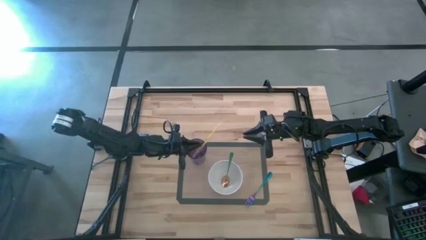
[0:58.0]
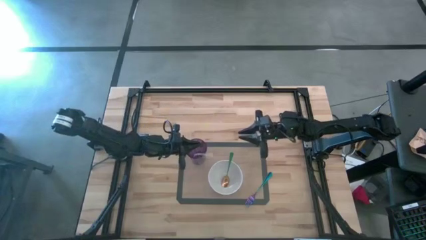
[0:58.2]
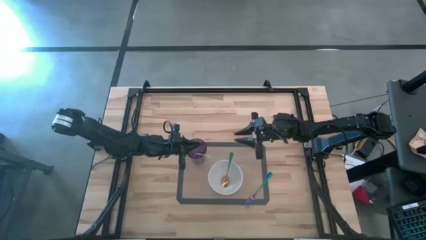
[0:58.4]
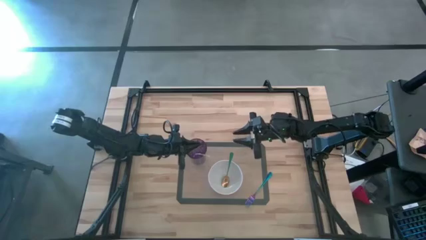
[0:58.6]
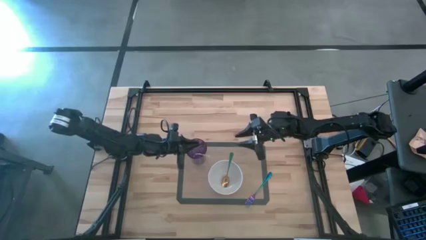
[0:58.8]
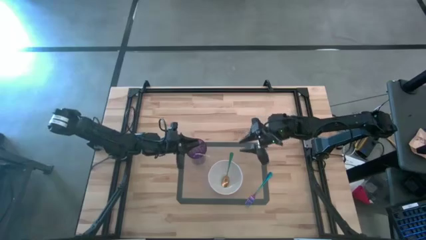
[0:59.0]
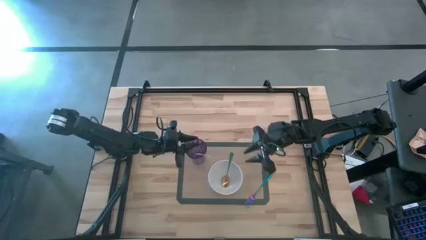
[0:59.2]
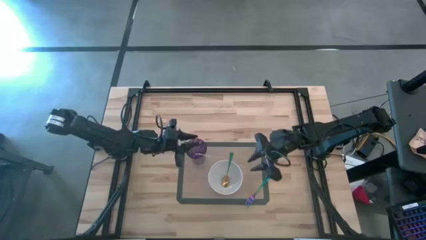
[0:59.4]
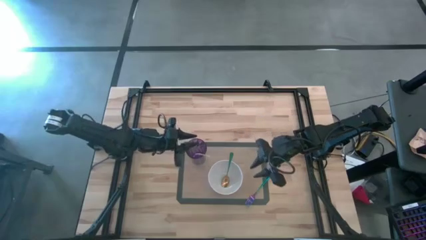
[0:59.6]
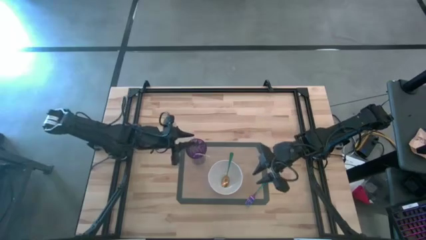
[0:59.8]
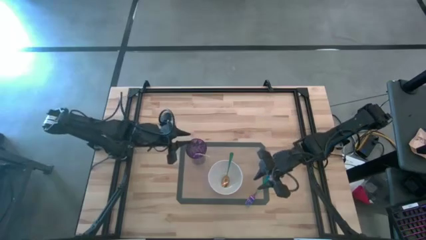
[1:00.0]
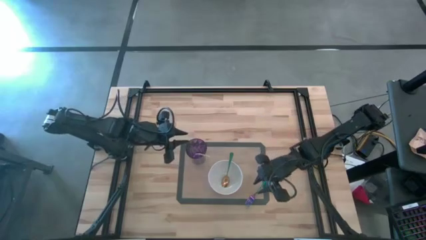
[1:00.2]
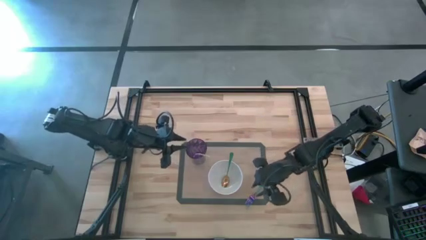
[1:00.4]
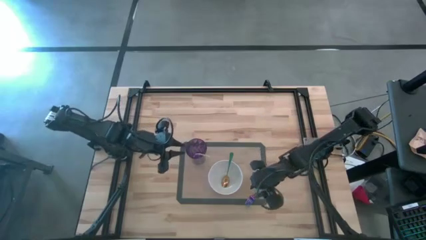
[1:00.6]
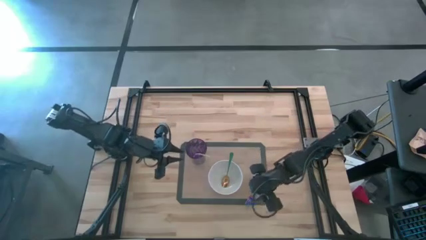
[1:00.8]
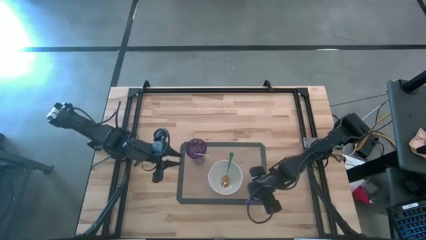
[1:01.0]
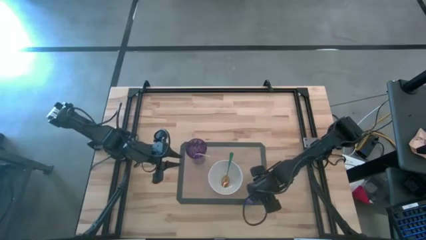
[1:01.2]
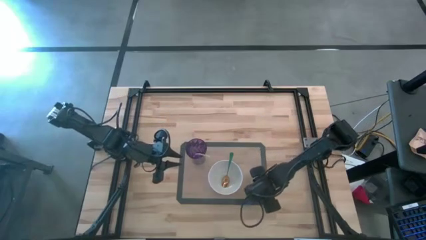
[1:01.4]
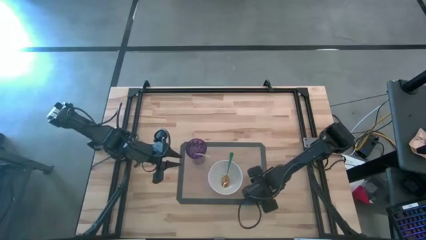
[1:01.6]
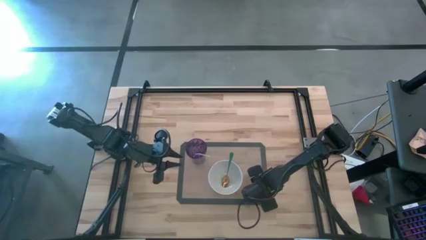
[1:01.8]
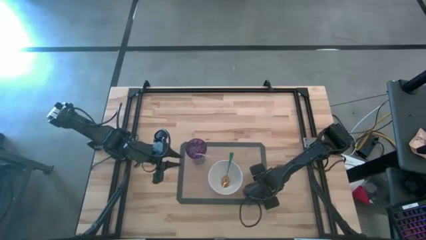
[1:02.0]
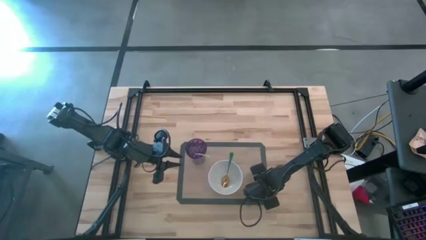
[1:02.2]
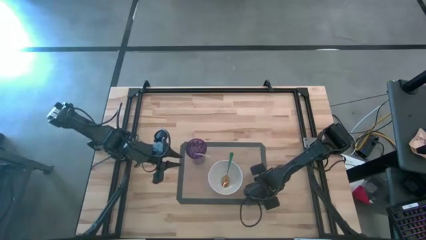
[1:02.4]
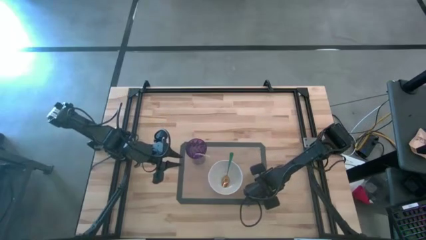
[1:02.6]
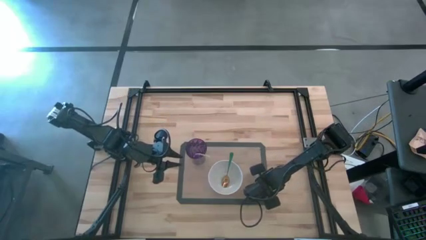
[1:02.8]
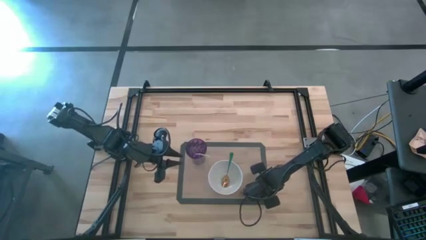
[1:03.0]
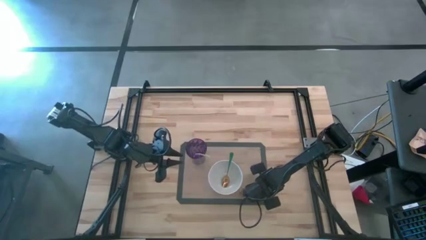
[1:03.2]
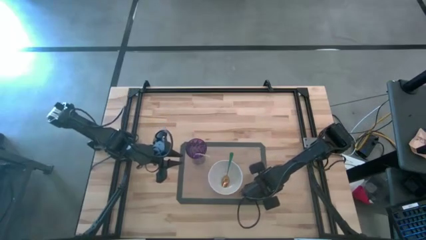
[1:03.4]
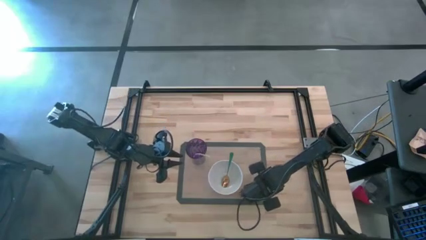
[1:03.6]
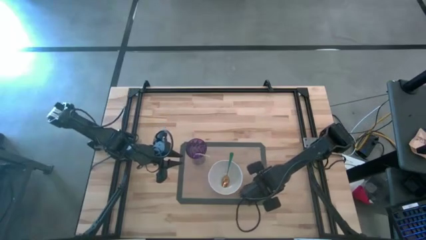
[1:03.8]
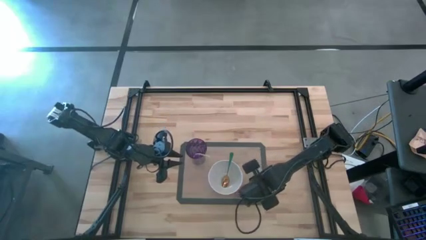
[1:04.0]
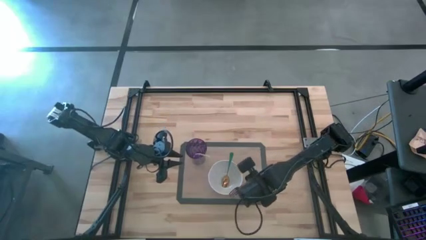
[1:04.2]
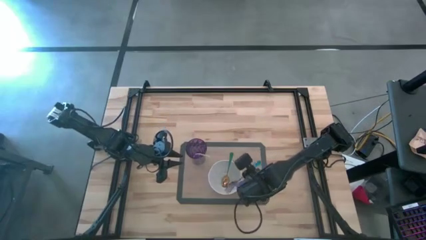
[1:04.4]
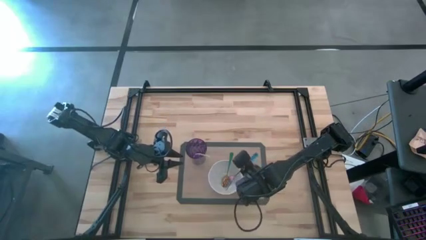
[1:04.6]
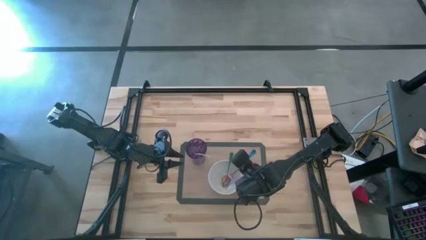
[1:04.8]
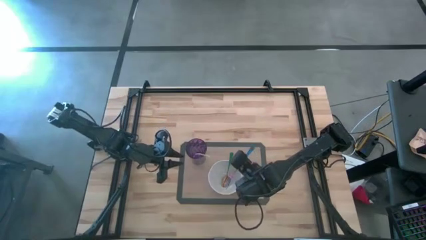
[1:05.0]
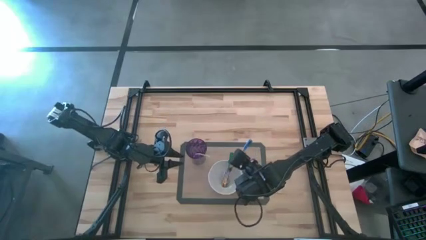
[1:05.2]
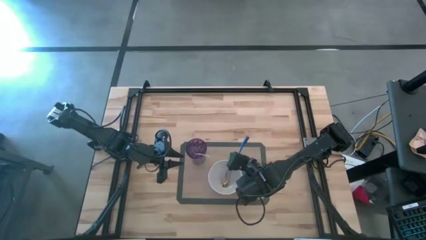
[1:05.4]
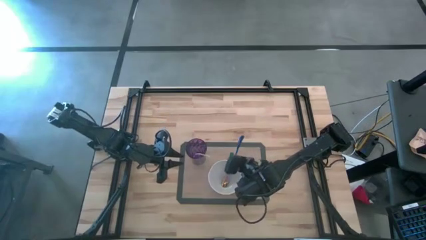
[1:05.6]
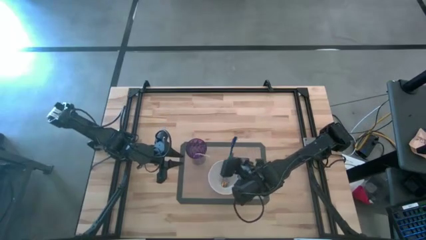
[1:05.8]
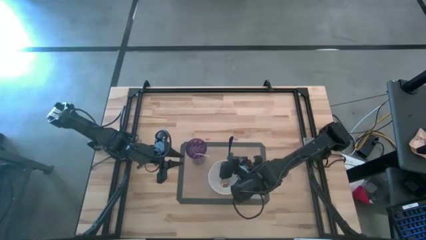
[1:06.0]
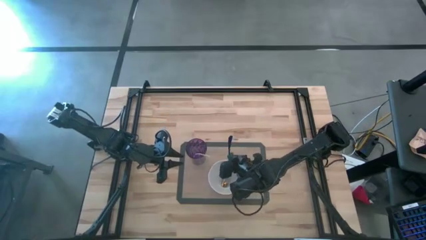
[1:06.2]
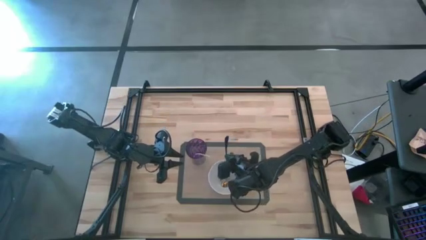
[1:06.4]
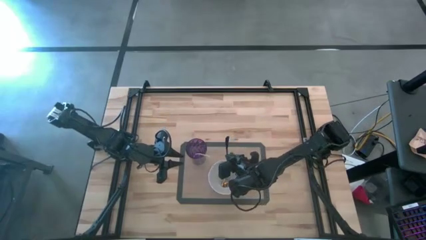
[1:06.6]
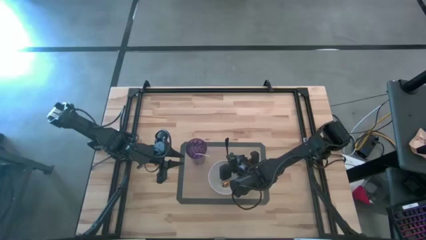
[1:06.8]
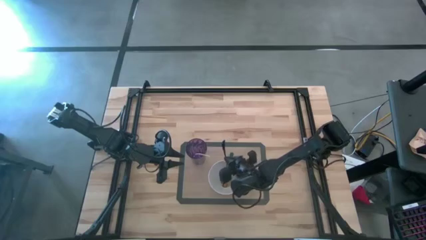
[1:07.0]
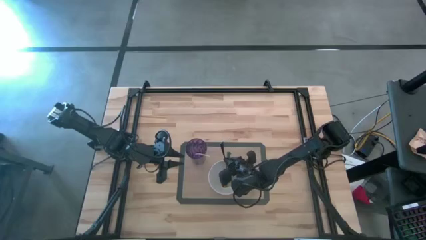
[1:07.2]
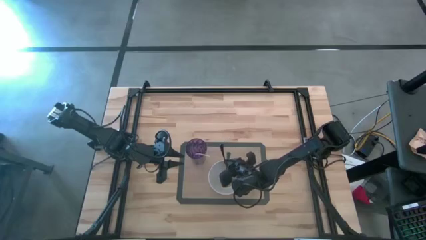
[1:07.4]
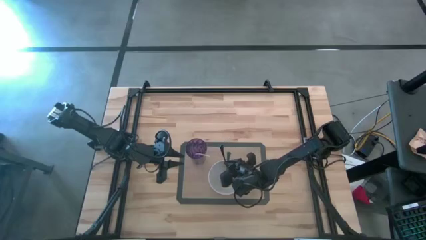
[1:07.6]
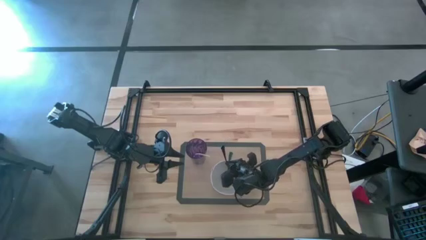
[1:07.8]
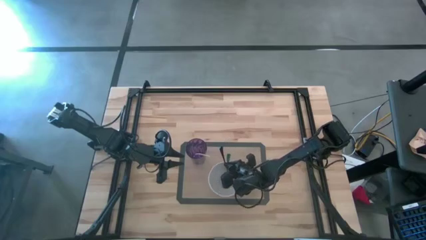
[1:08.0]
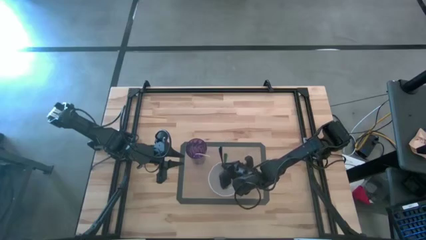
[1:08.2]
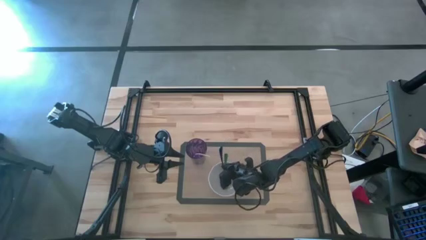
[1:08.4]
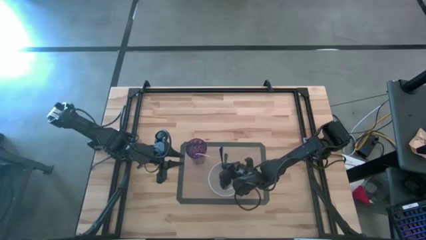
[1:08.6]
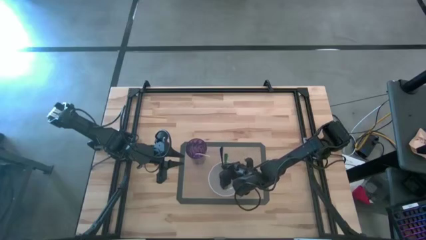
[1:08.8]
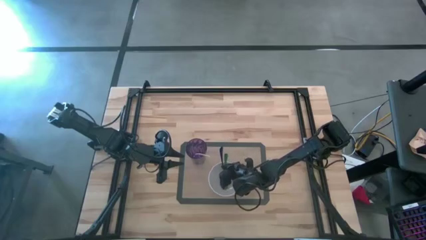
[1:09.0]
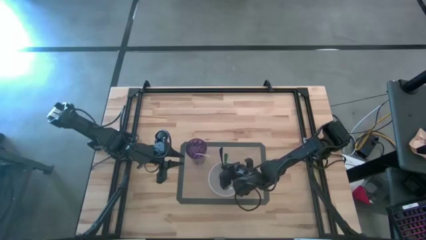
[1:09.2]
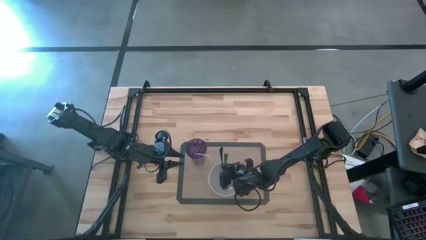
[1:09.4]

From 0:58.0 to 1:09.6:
Task: Pick & Place Utensil
Put the blue fork on the white bowl

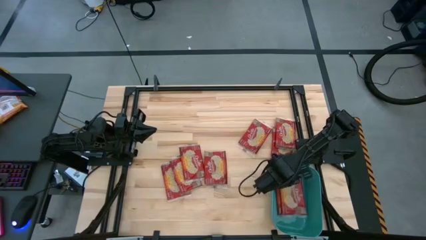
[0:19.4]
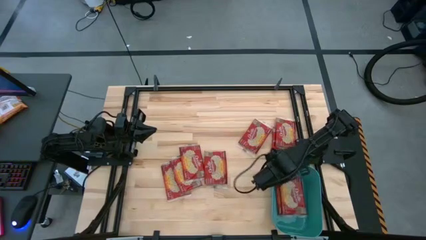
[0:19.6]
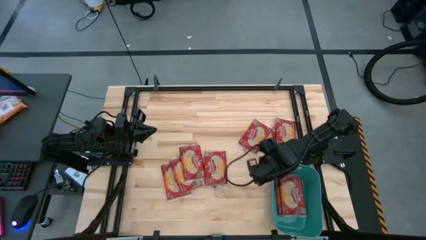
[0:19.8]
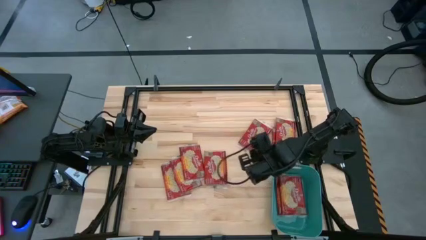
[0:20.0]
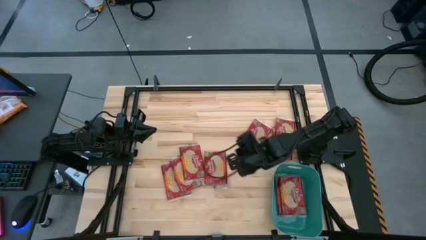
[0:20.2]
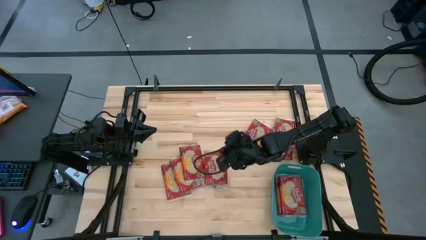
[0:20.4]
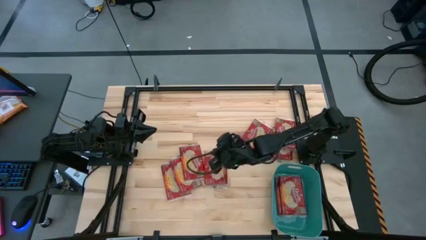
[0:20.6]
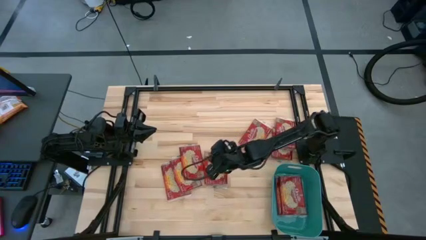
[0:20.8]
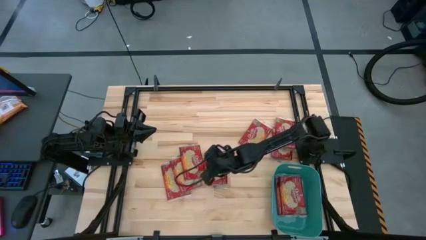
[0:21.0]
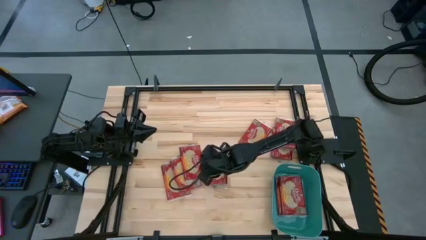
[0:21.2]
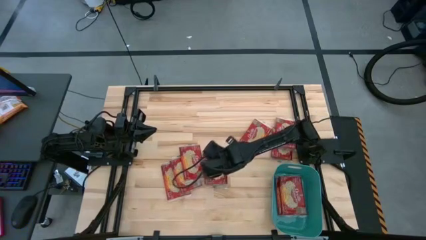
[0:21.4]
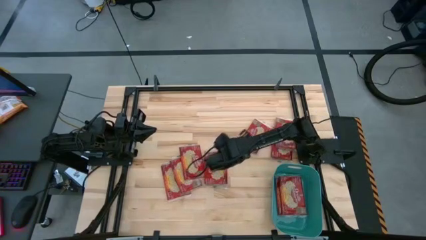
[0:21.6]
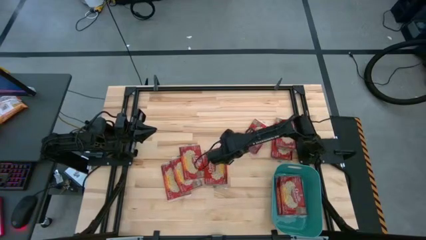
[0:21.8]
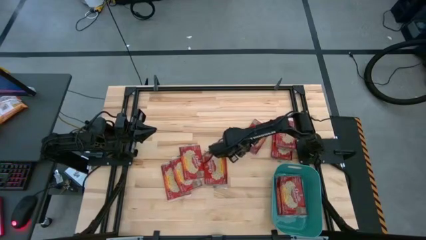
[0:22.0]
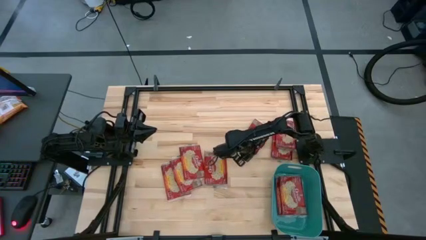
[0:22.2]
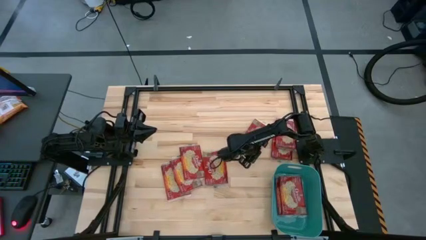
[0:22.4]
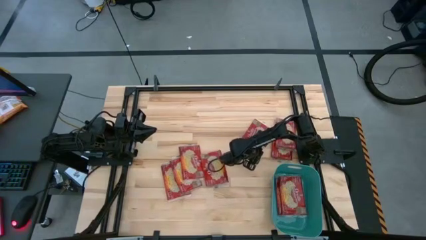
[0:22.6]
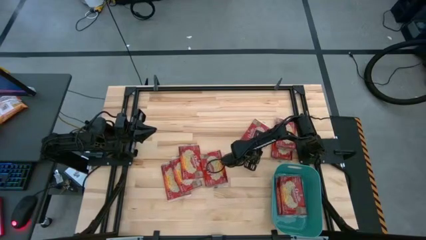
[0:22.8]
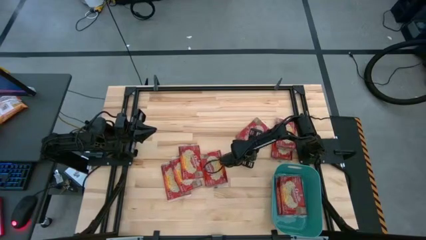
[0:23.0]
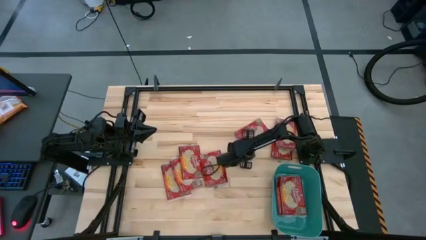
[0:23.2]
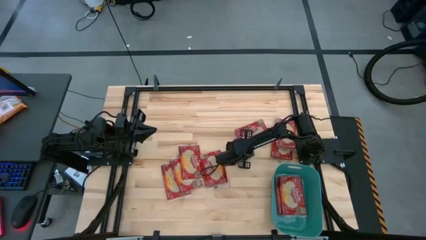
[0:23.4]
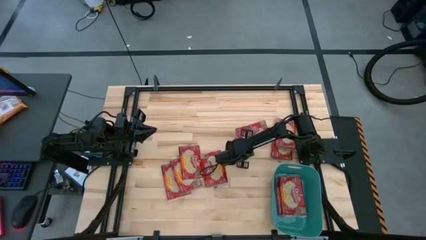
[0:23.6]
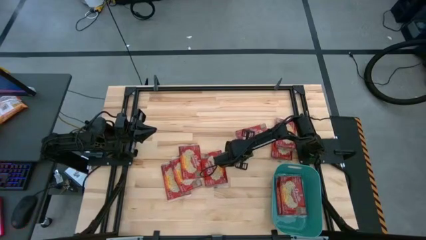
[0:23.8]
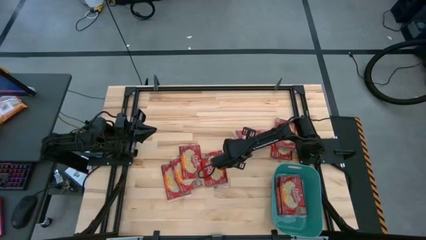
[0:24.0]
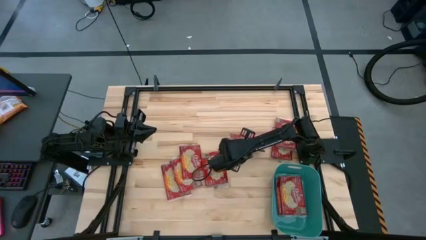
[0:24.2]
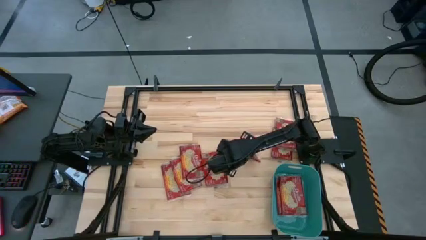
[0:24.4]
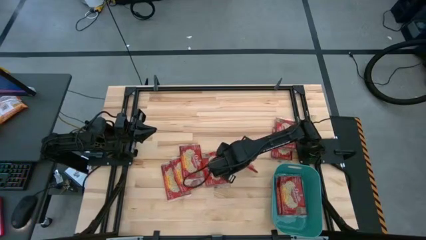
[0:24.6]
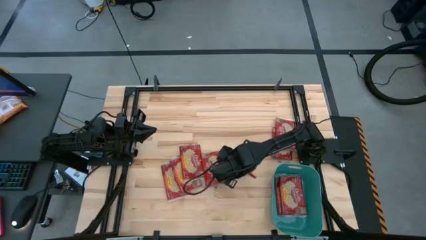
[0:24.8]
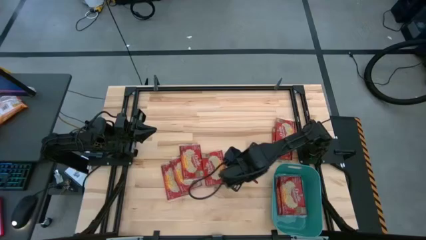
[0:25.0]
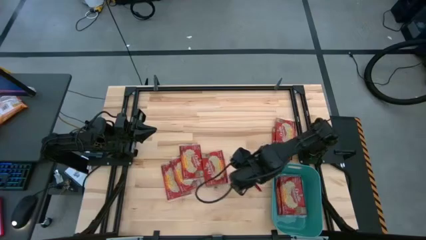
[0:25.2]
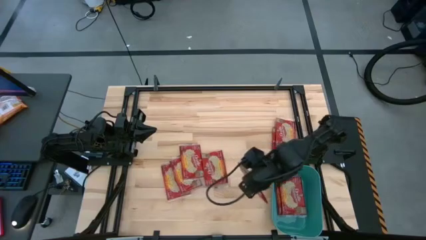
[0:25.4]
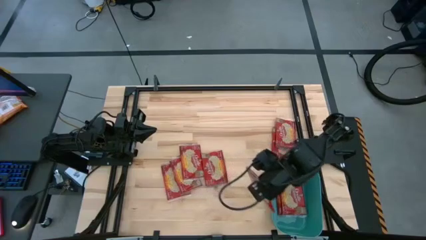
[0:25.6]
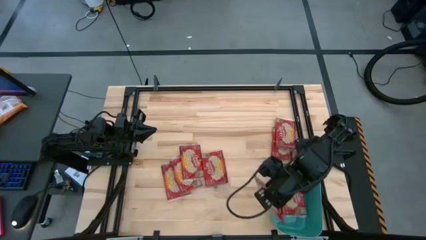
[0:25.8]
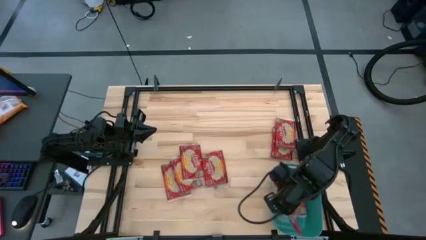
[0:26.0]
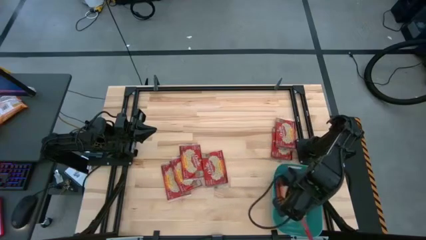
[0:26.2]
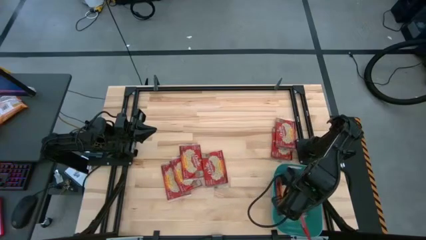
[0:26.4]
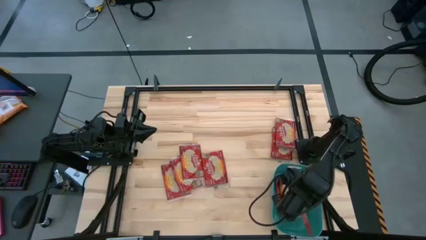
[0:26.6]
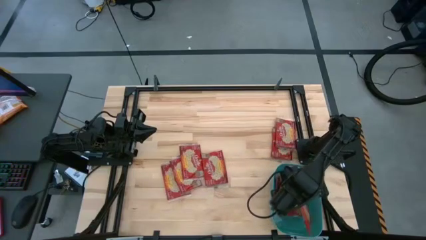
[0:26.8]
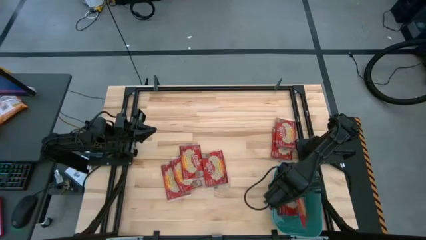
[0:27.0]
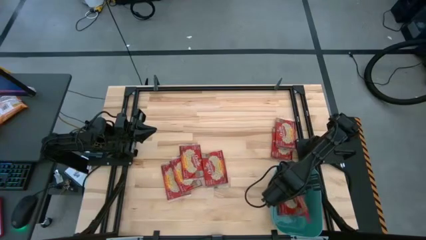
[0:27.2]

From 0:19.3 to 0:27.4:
Task: Sort popcorn bags into baskets
Put the red popcorn into the green bin
